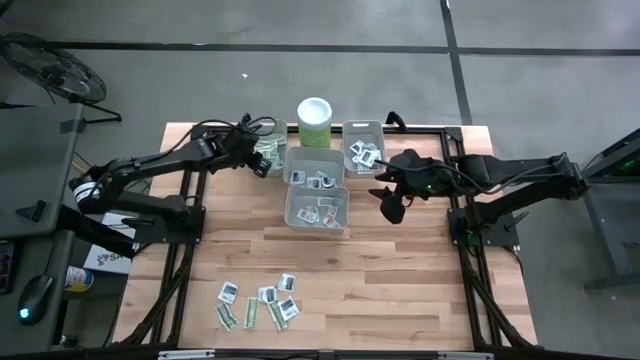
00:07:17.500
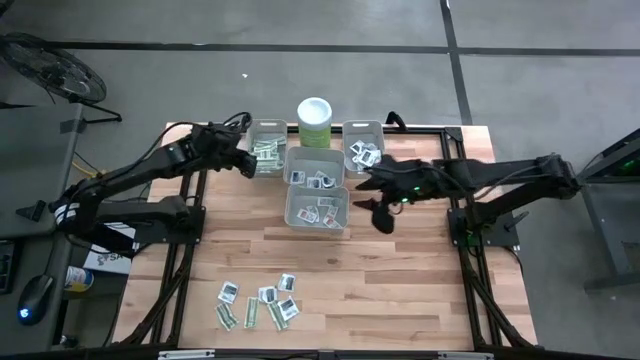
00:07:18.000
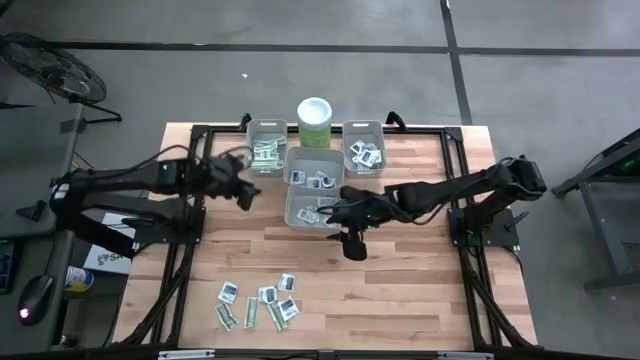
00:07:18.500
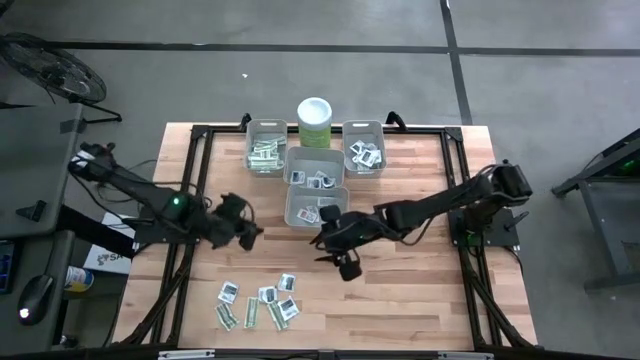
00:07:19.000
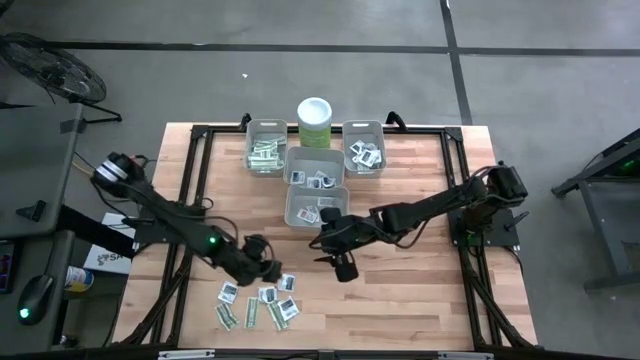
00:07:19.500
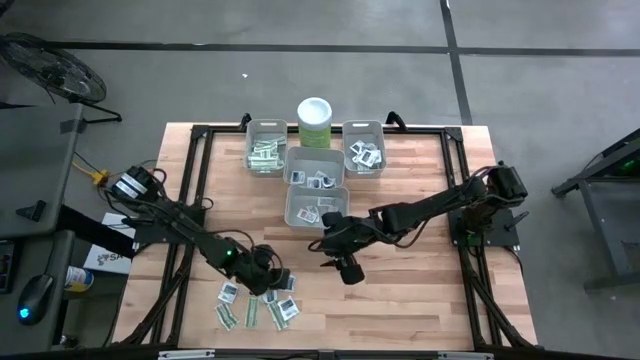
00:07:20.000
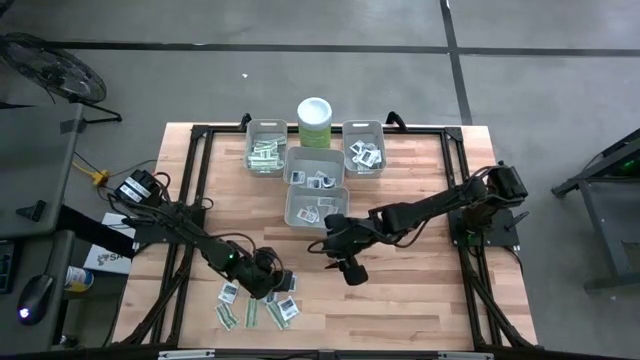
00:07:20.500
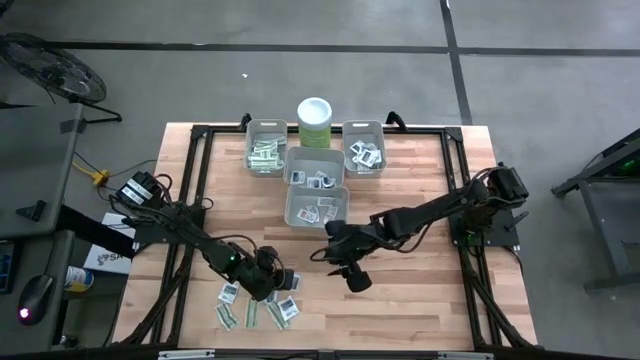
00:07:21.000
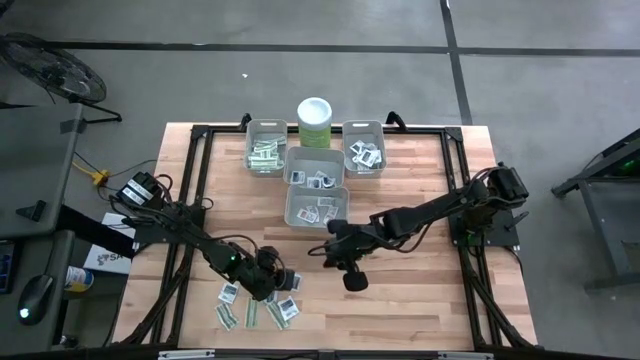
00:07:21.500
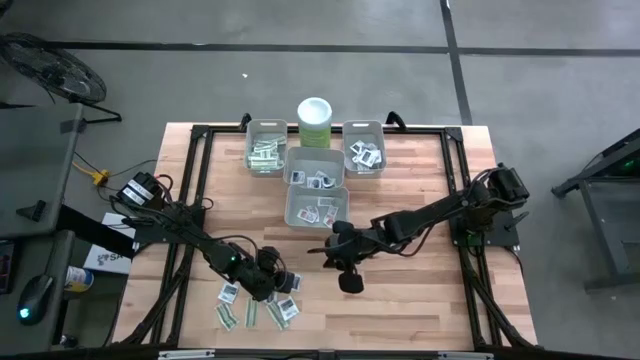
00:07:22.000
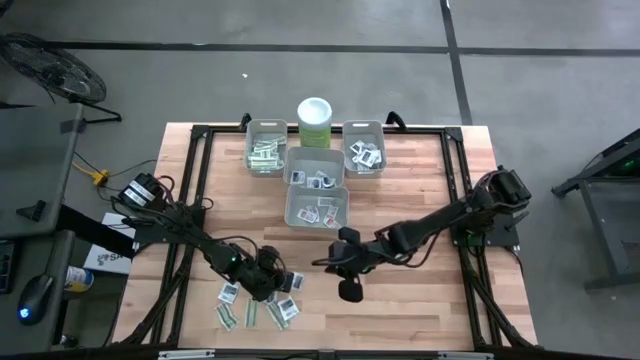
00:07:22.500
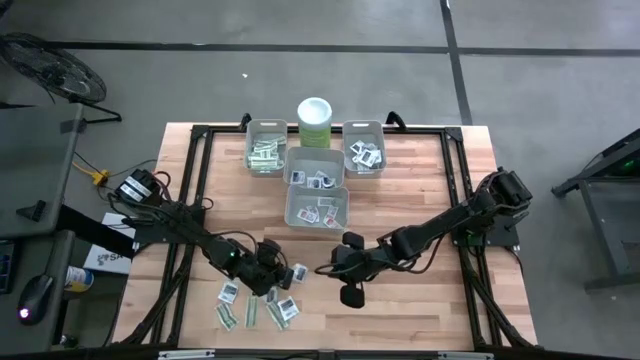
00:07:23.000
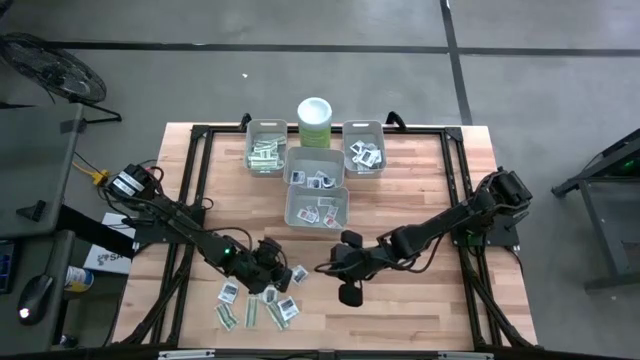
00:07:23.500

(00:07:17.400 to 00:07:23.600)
Task: Pick & Place First Aid Supplies
Put the towelette pack into the right bin

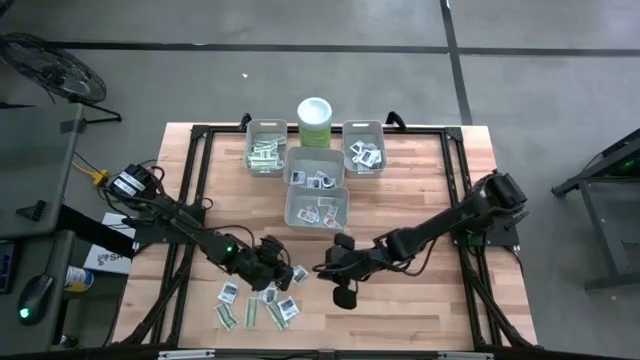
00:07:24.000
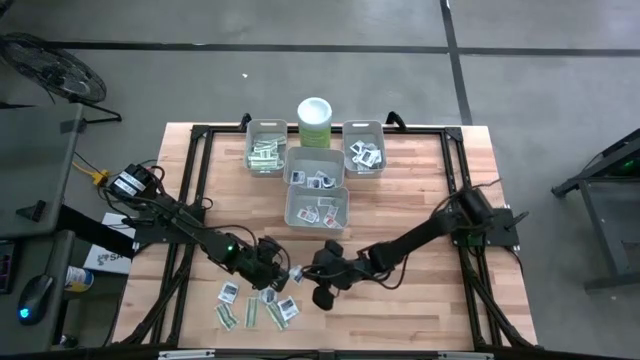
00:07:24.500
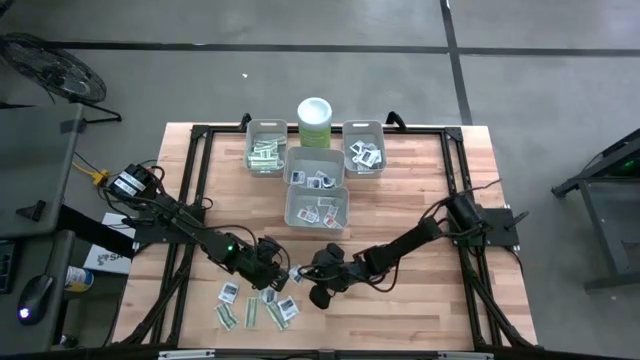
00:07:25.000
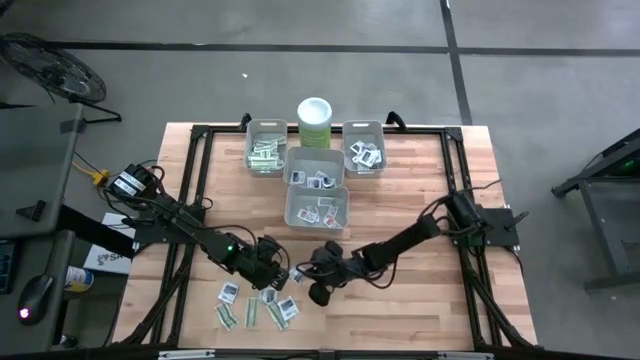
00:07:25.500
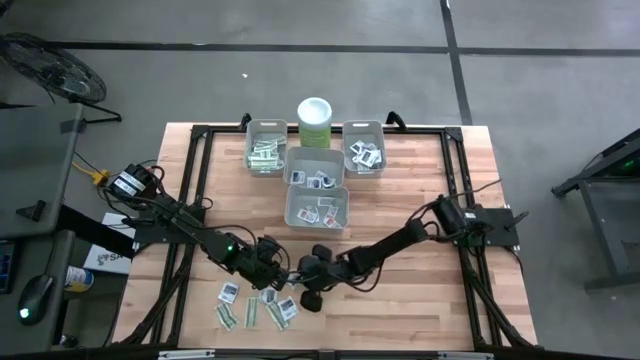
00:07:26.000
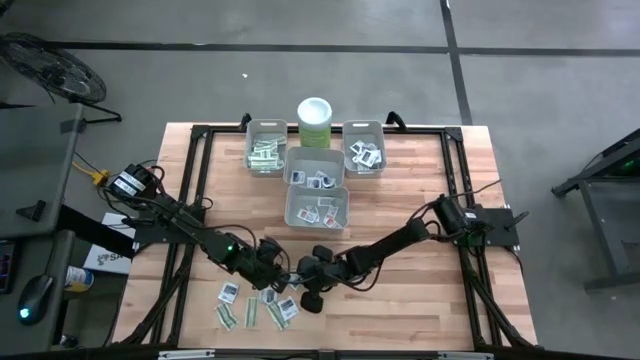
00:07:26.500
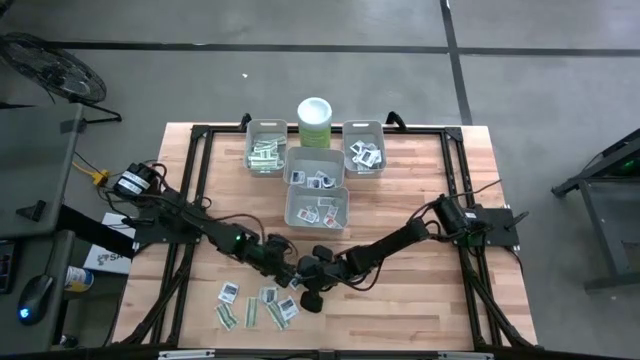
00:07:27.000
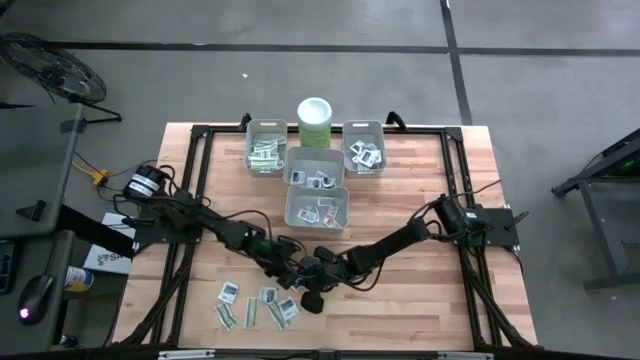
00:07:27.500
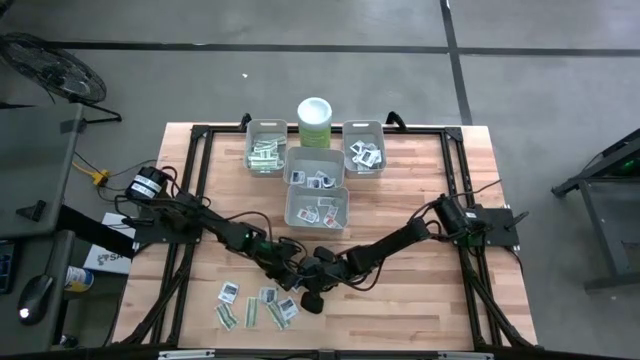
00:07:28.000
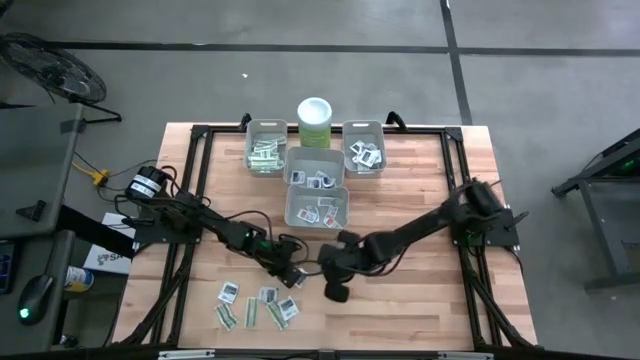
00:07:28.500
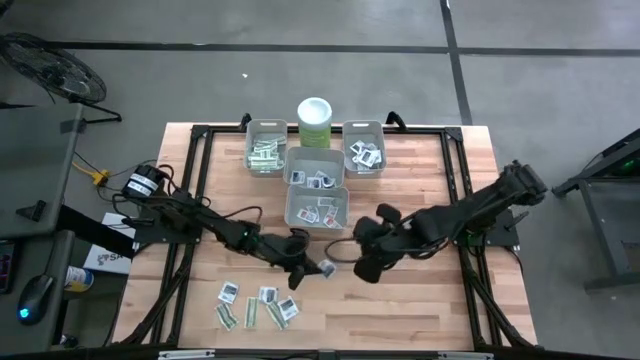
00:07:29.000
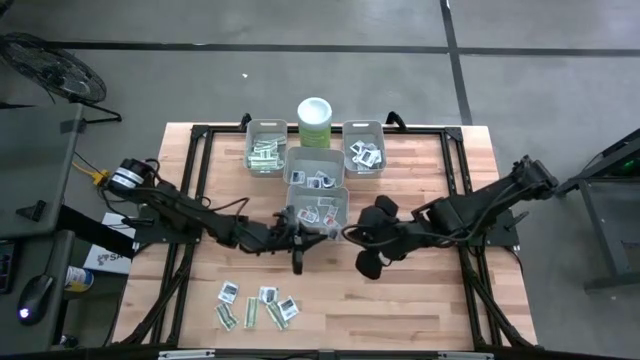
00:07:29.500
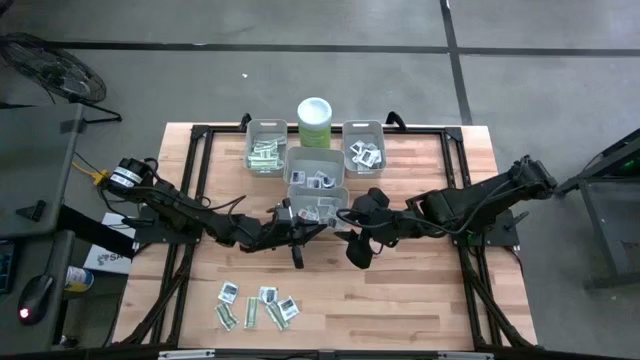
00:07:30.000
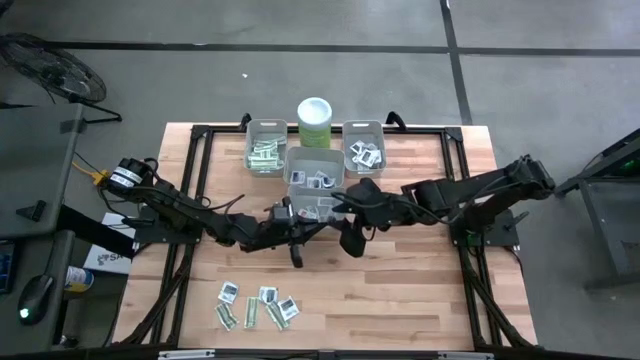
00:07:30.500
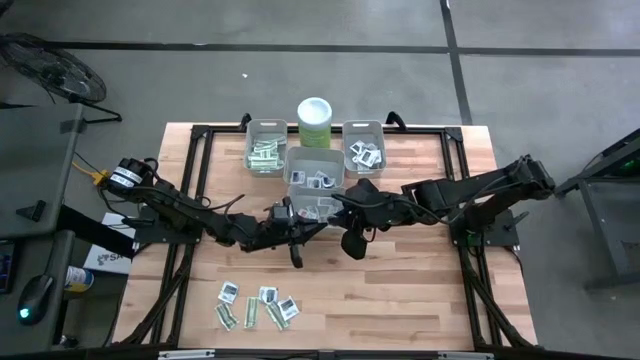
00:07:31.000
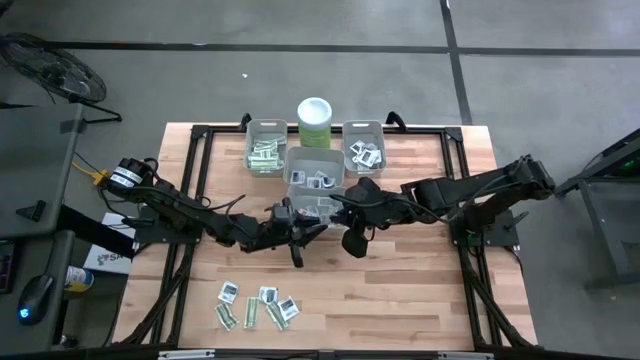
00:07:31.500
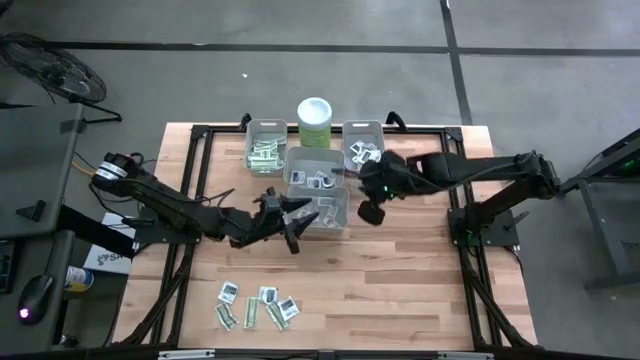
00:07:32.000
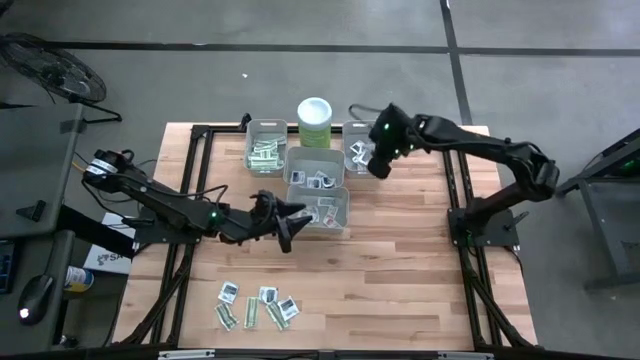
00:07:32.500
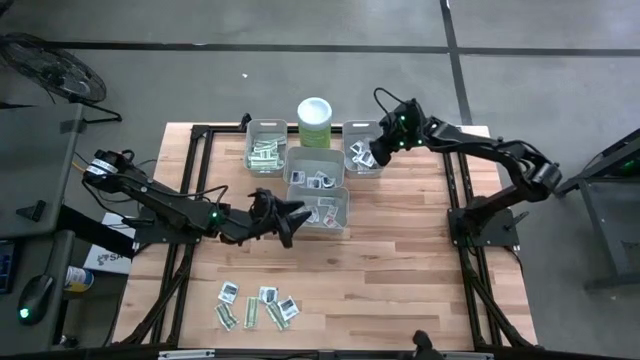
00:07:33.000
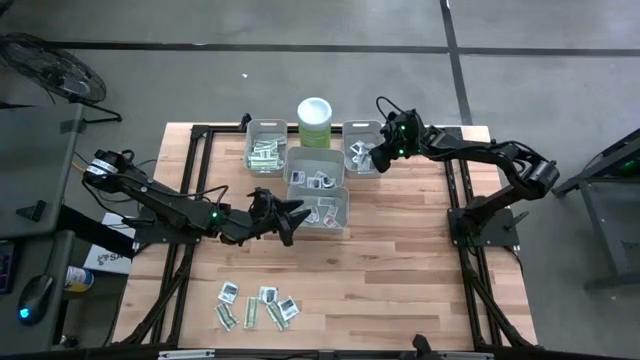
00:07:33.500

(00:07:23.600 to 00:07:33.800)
Put the towelette pack into the right bin

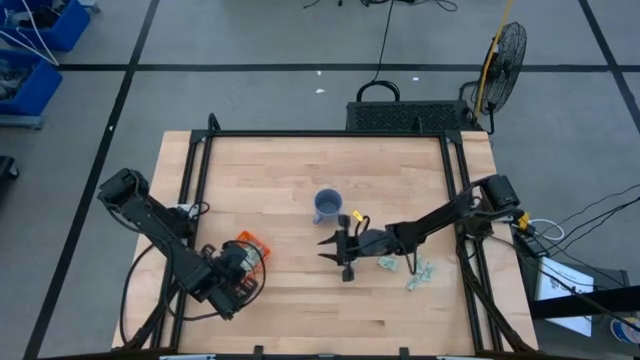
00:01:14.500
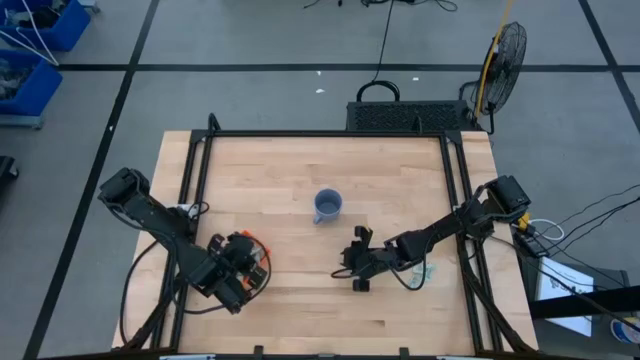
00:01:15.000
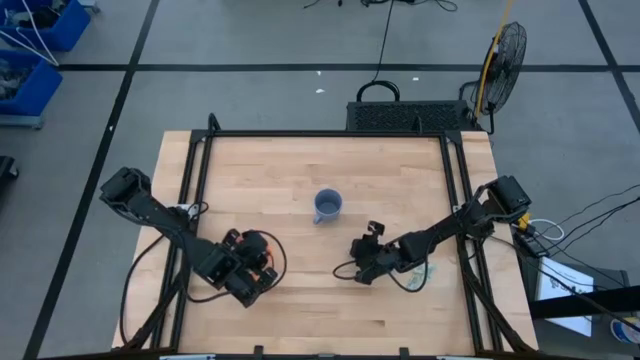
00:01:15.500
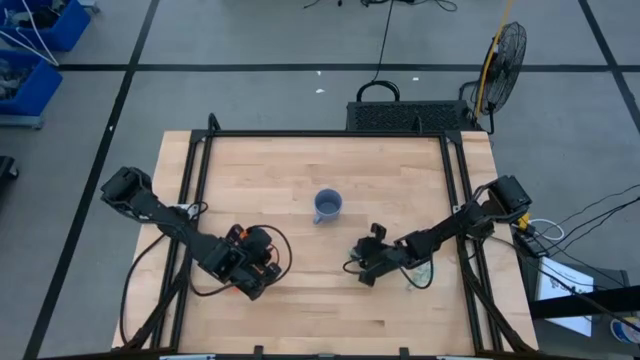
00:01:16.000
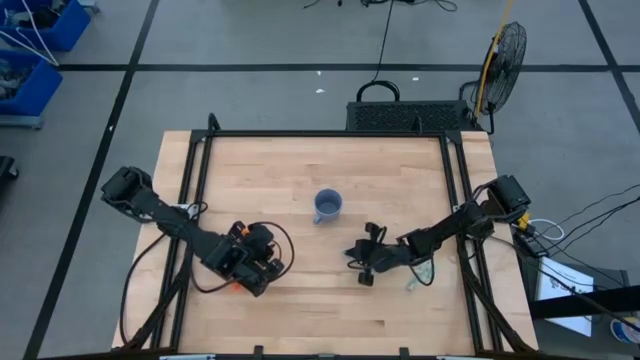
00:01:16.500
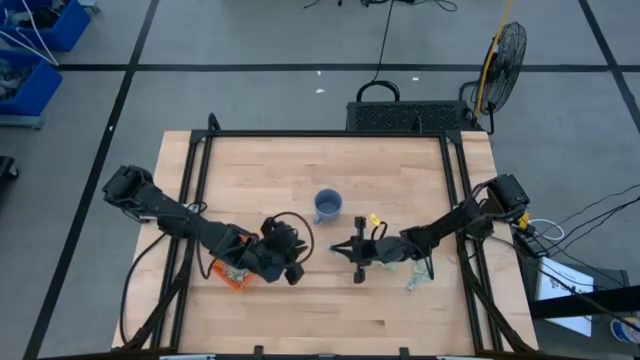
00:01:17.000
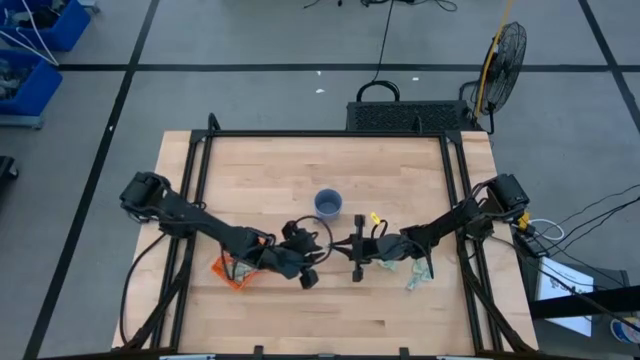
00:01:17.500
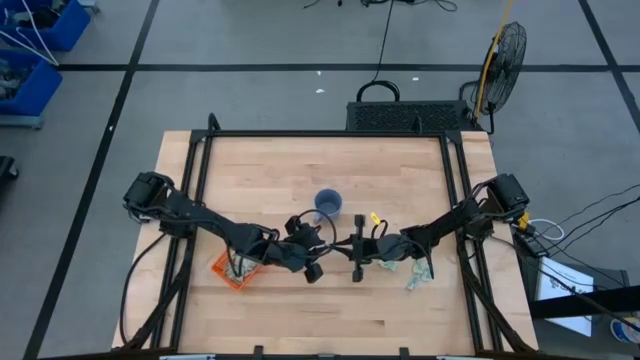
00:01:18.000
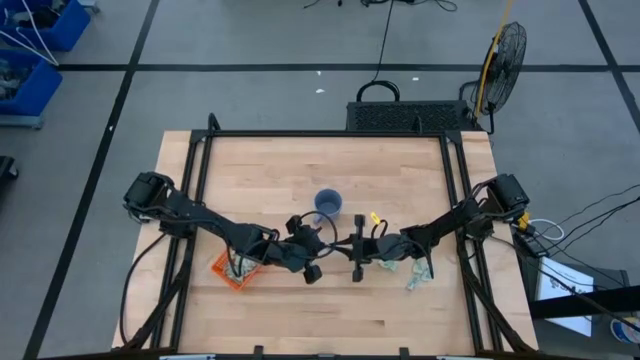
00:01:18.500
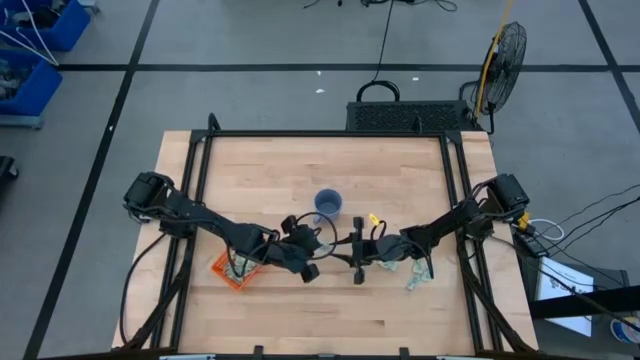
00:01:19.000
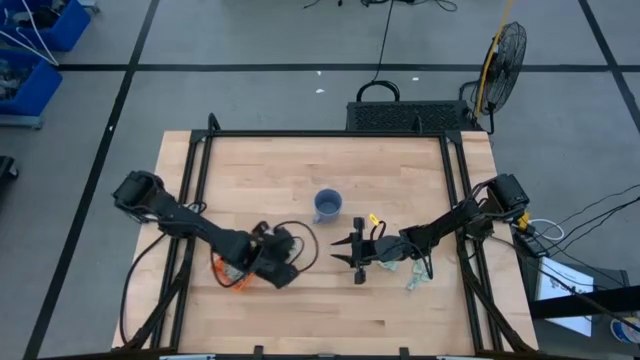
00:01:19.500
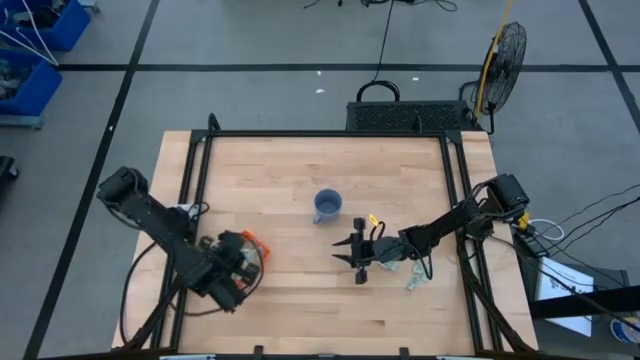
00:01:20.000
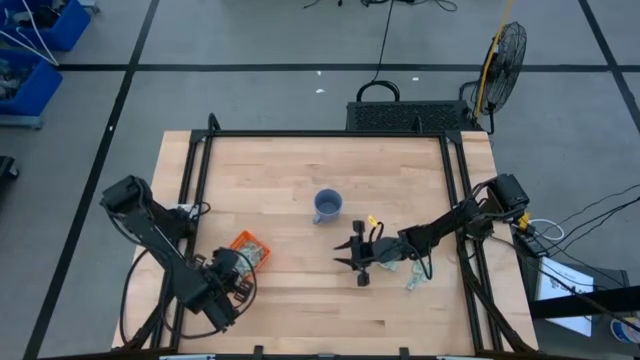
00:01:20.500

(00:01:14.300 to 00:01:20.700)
Task: Pick and place Stevia / Truvia into bins
Put the green stevia packet into the orange basket
